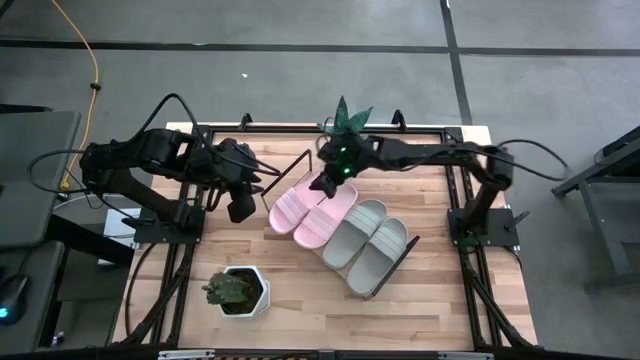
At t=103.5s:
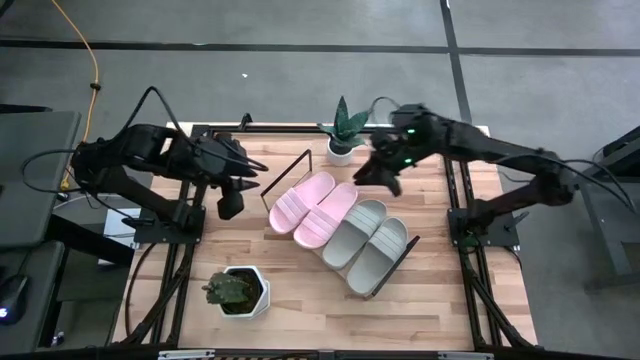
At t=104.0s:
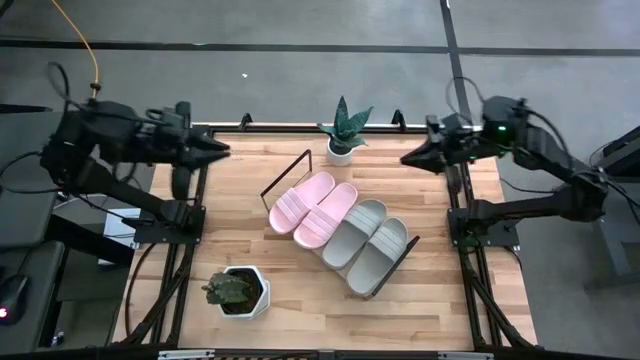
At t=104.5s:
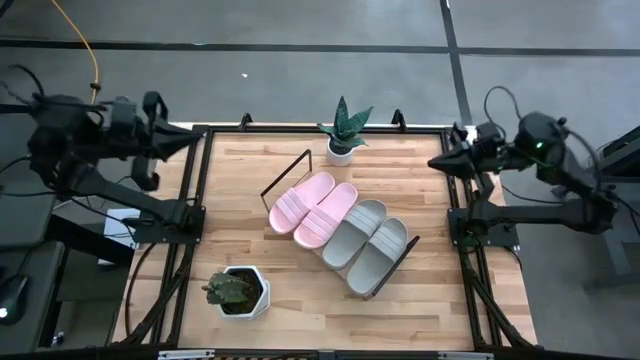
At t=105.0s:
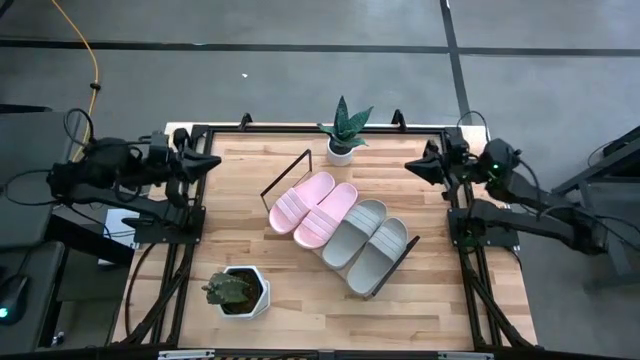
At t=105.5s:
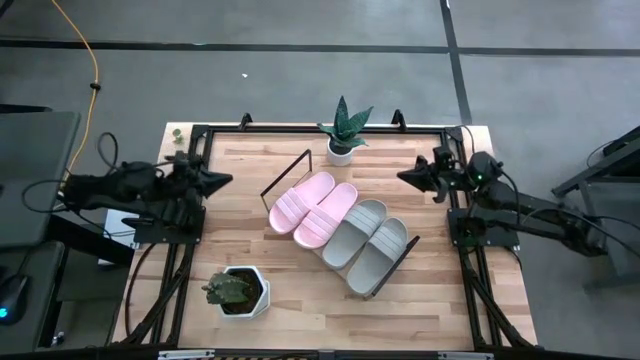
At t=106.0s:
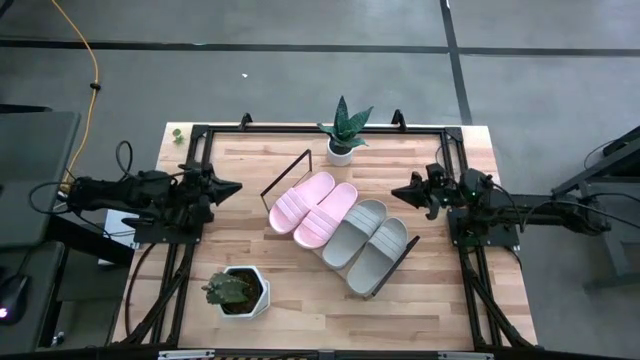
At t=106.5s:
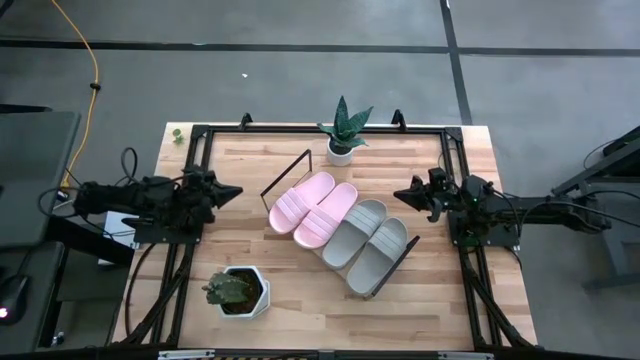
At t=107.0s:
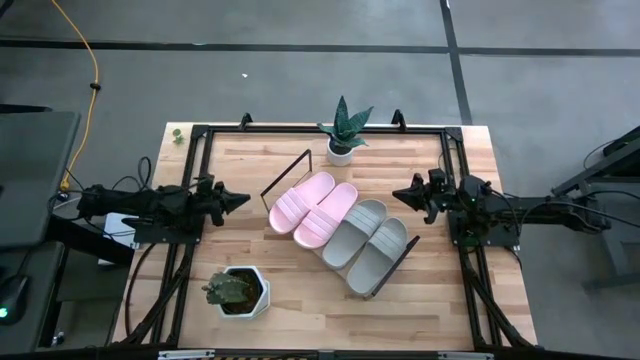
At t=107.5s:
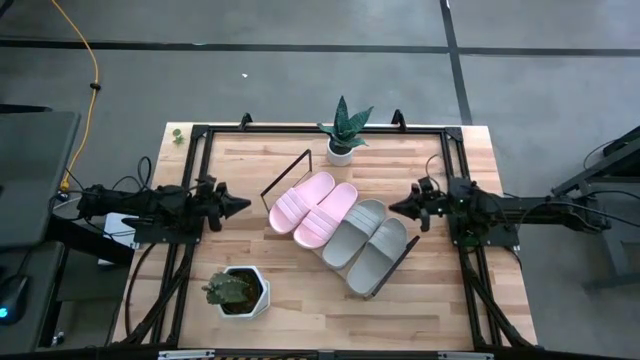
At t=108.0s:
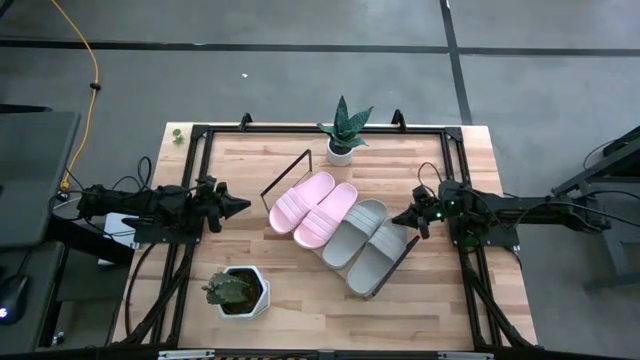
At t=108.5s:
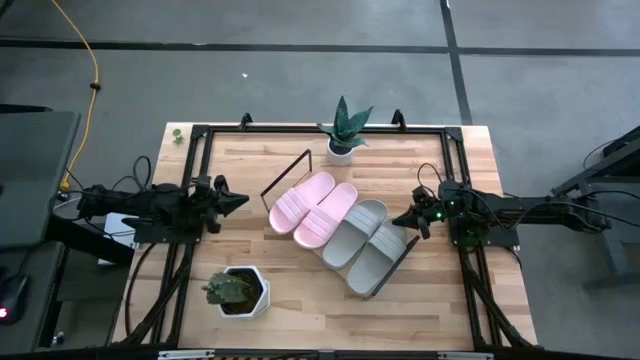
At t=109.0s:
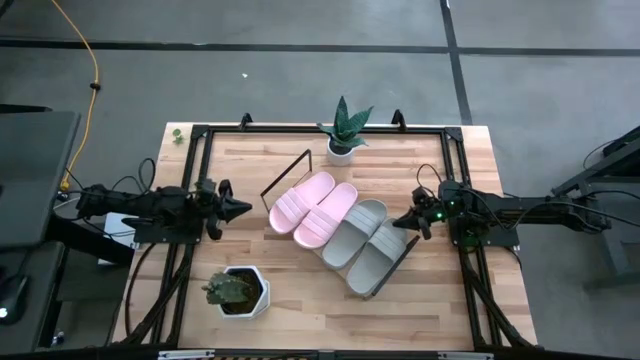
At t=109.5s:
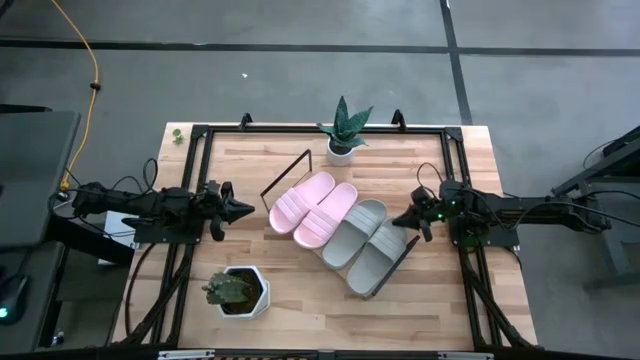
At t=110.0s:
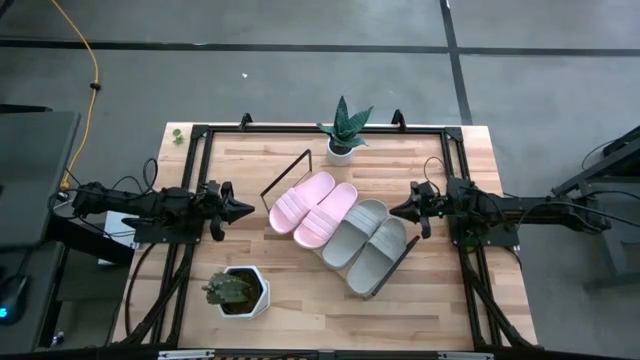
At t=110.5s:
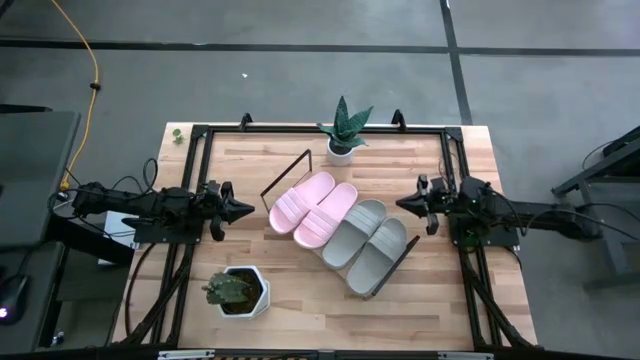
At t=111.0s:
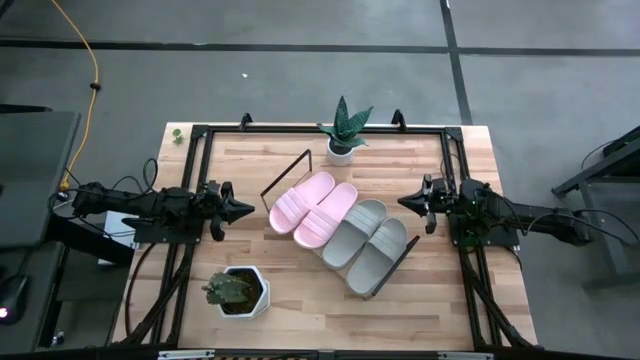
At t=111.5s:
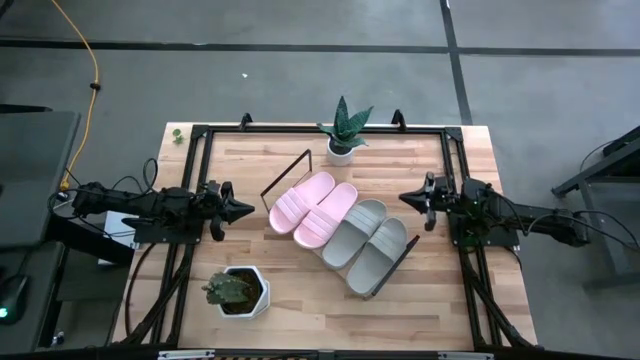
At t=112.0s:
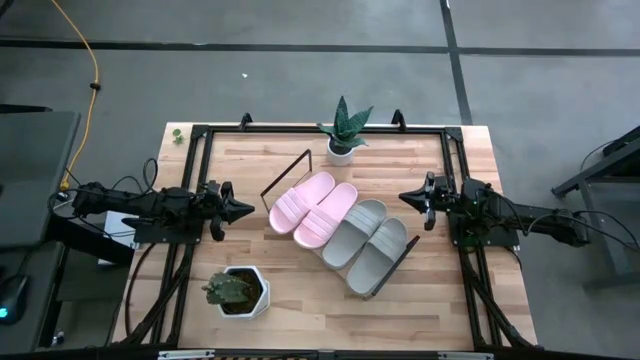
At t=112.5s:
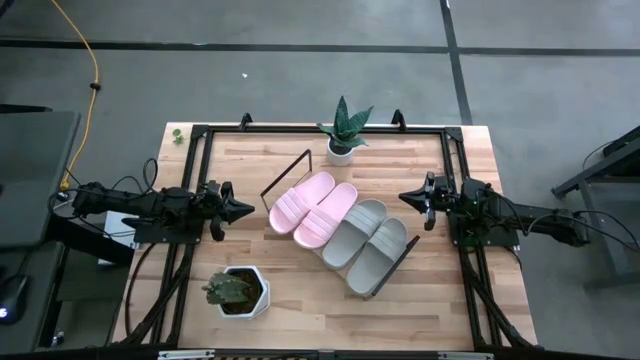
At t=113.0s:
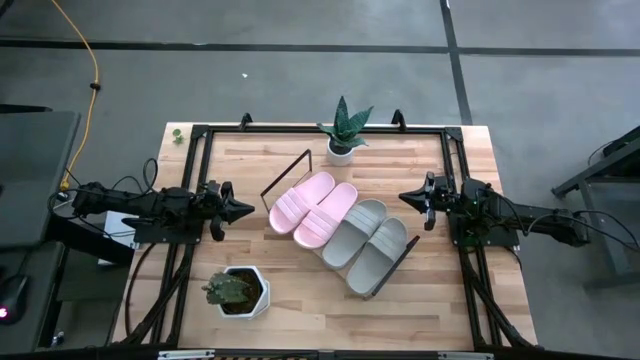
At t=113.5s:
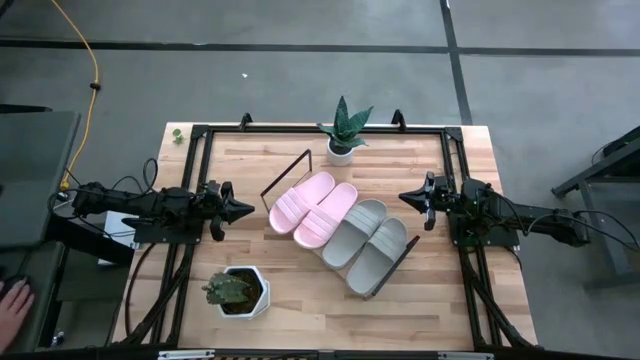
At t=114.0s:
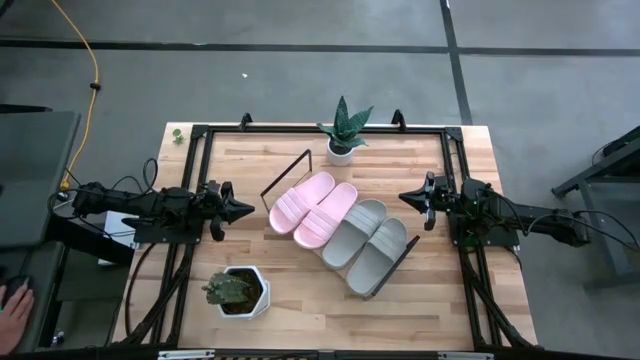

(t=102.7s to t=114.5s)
Task: Pick and place slides into the shelf
Return to Home Position

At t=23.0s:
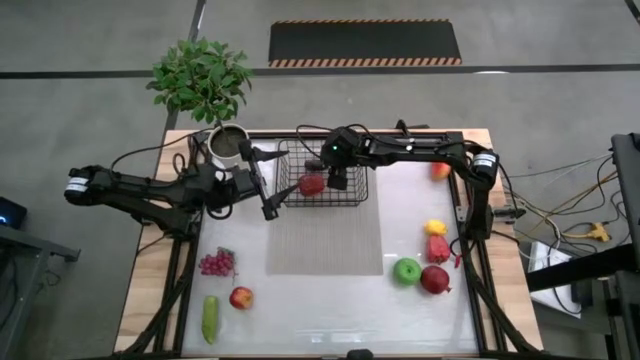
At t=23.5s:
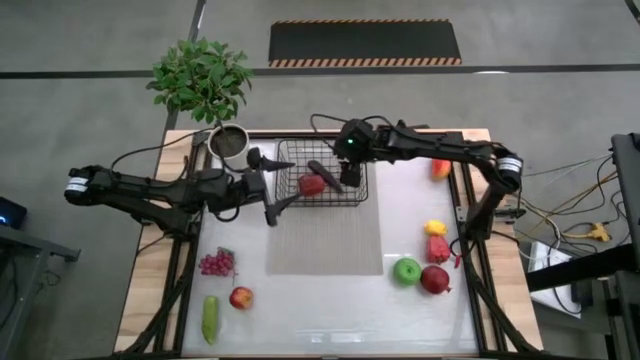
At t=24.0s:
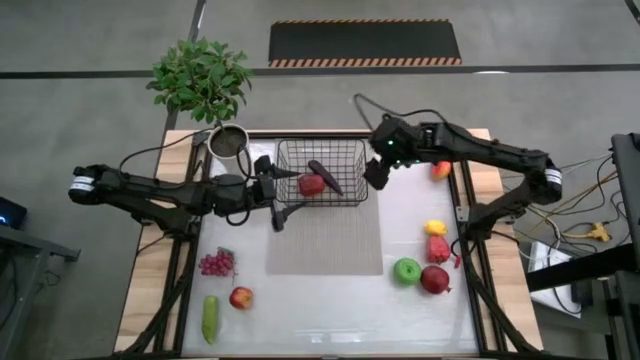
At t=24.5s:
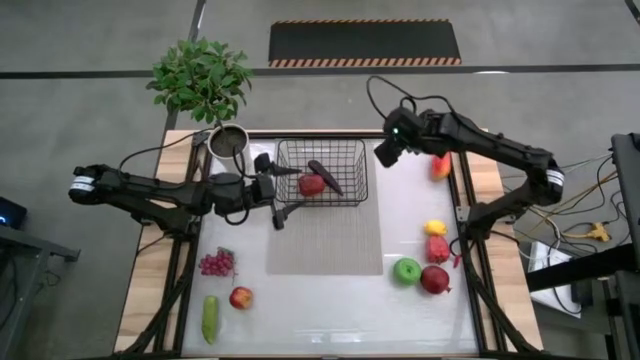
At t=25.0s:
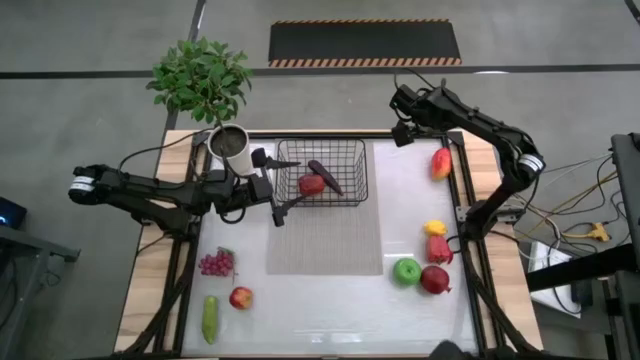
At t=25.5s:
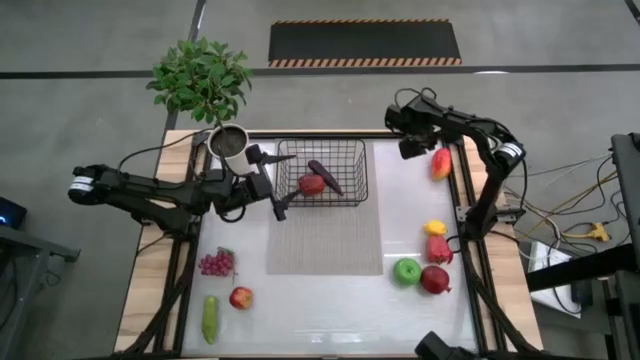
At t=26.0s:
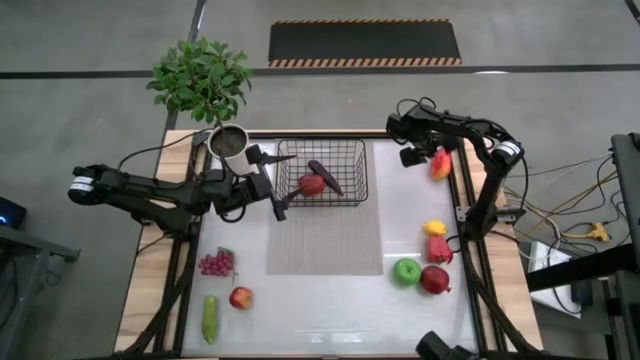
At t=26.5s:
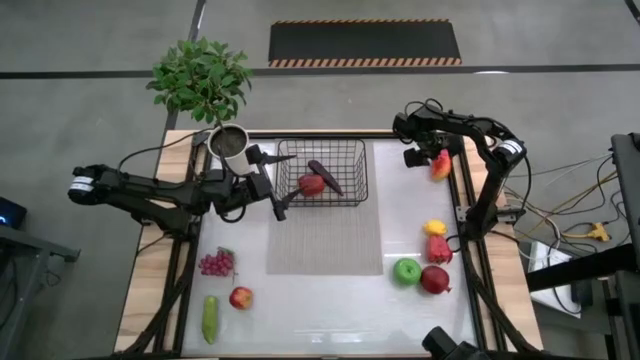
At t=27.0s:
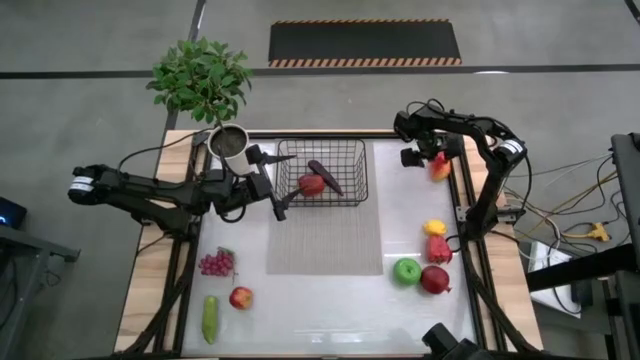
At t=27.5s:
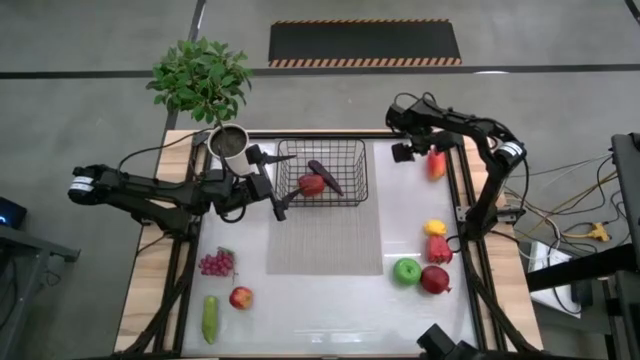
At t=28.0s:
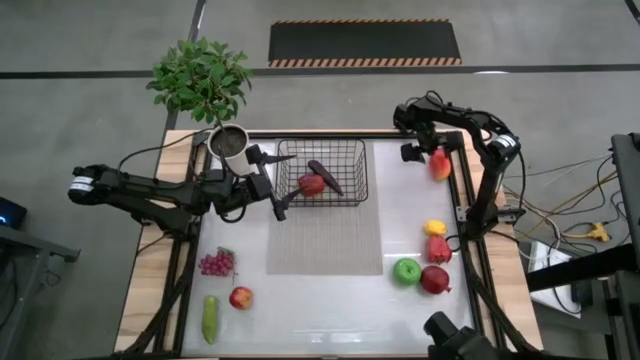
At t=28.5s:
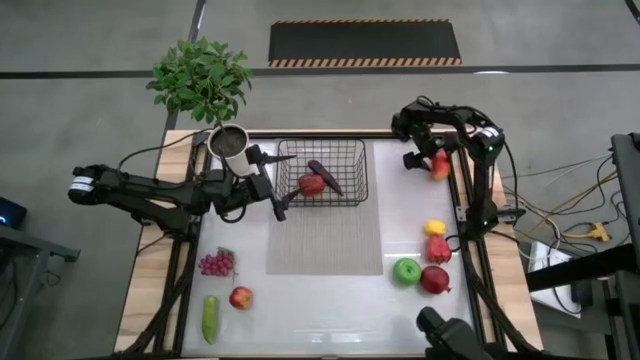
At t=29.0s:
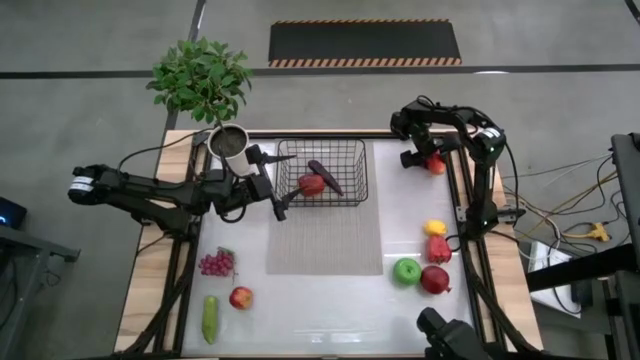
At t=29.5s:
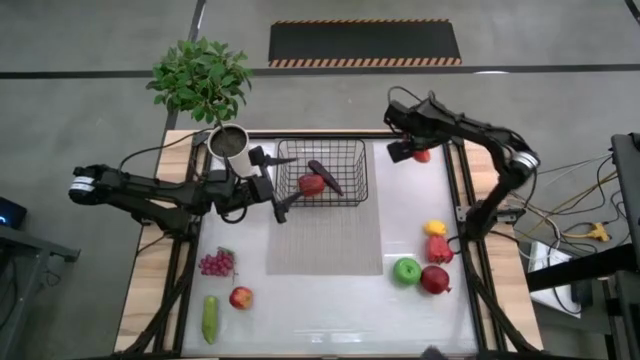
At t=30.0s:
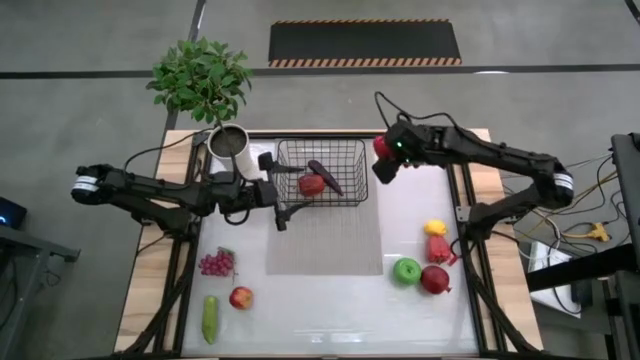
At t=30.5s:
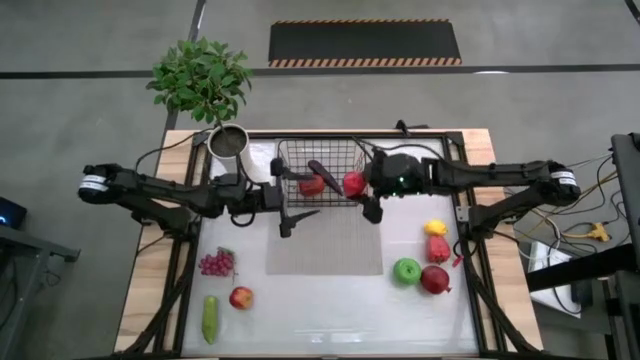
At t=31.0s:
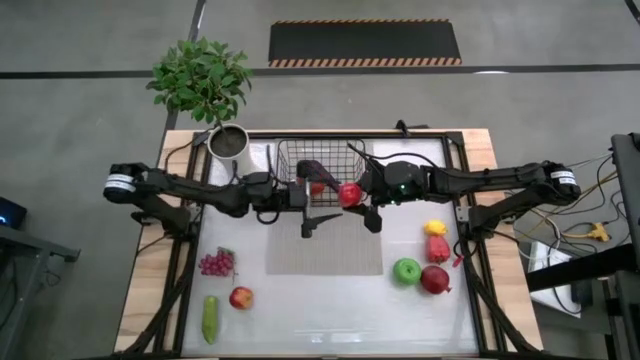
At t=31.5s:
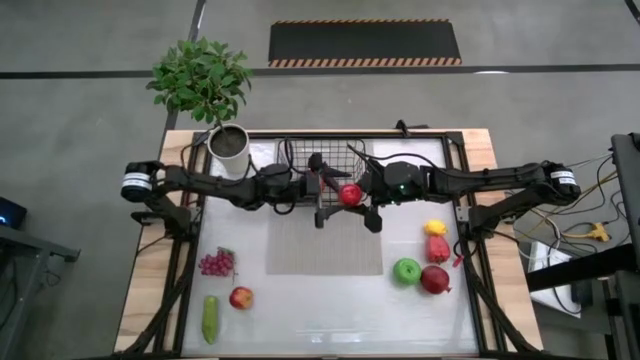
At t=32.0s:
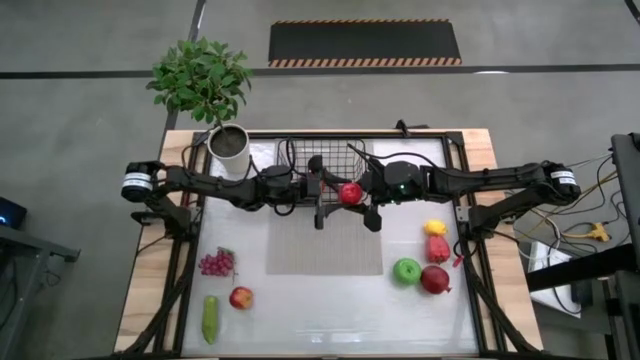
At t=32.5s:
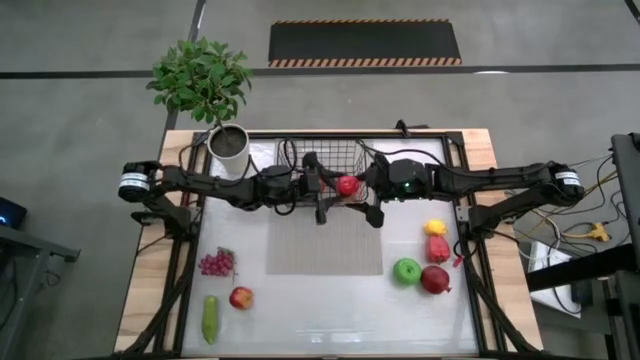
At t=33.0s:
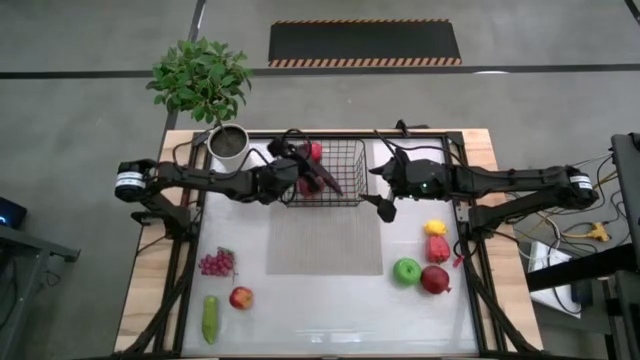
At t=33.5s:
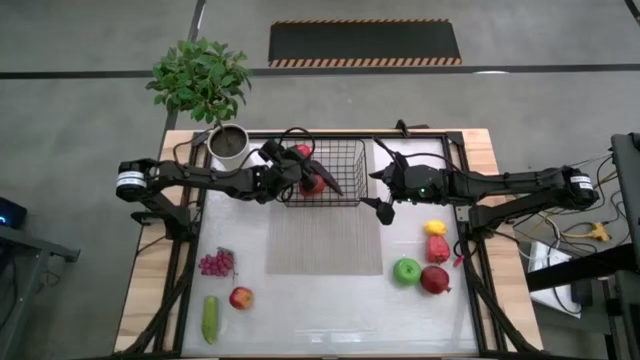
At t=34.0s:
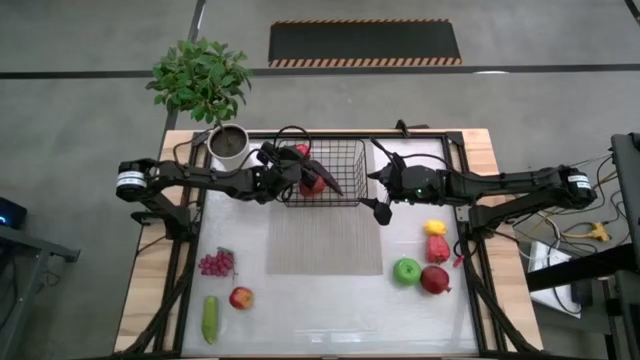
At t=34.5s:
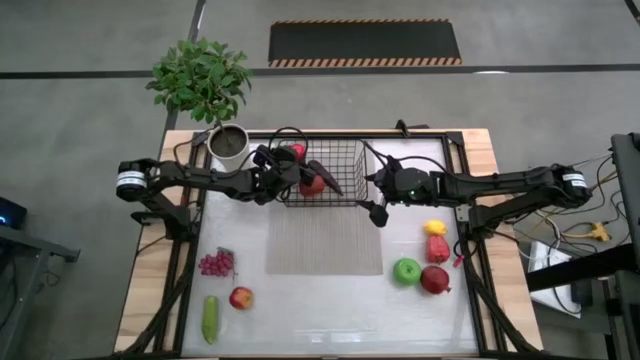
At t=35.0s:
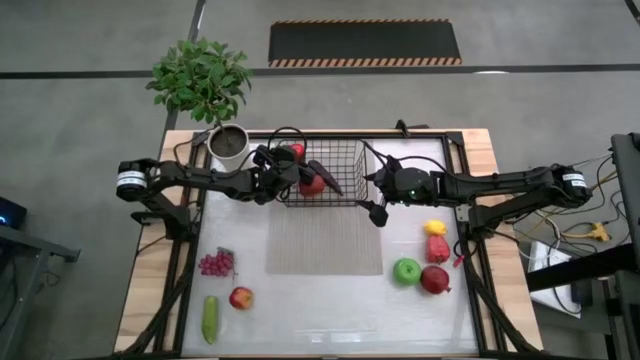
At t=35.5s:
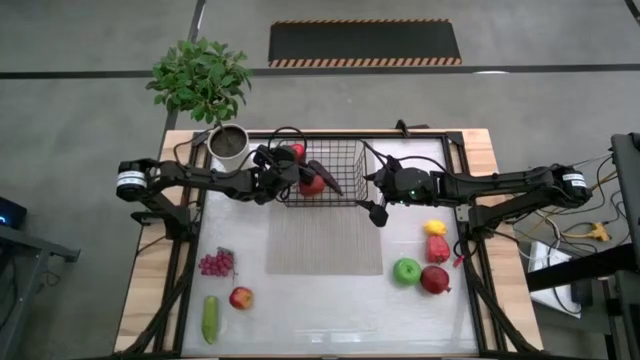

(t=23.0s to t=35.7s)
Task: Build produce basket
Put the mango into the wire basket
